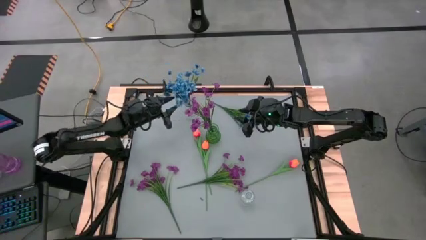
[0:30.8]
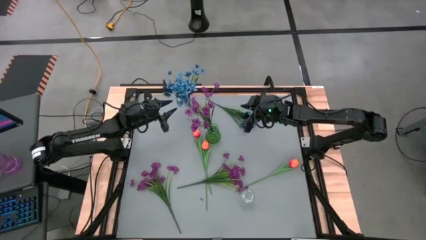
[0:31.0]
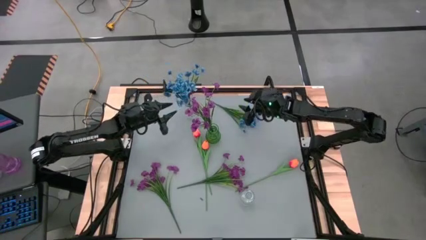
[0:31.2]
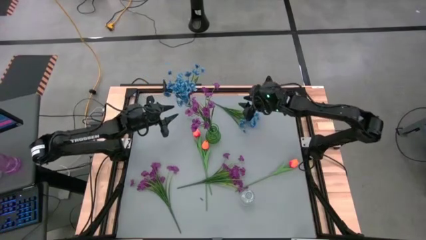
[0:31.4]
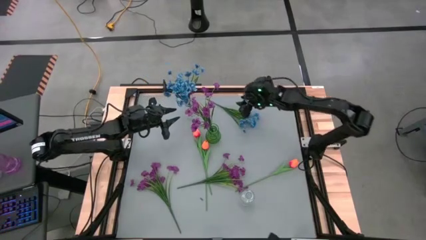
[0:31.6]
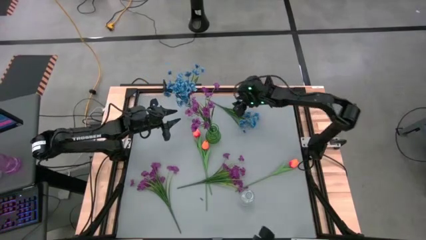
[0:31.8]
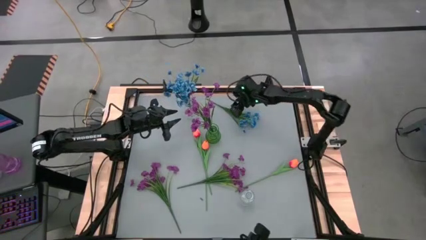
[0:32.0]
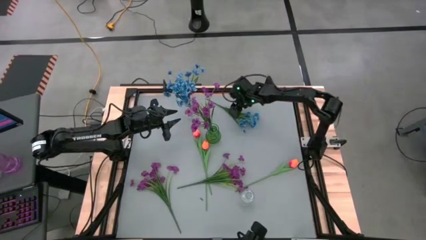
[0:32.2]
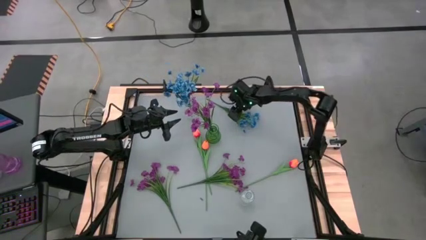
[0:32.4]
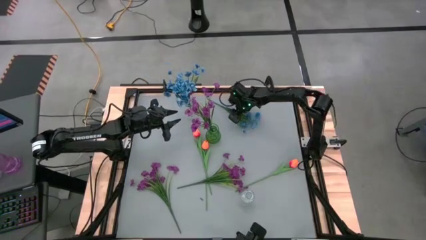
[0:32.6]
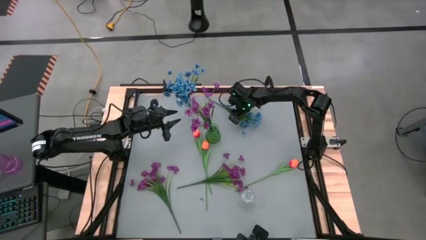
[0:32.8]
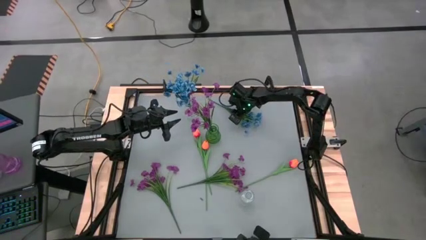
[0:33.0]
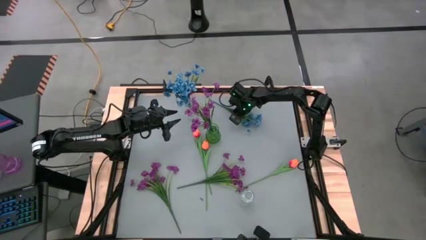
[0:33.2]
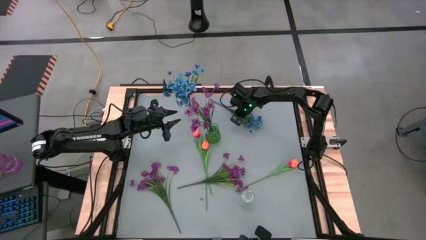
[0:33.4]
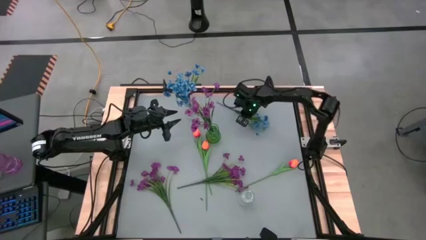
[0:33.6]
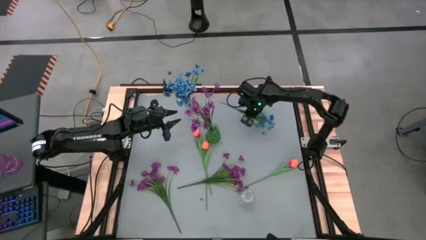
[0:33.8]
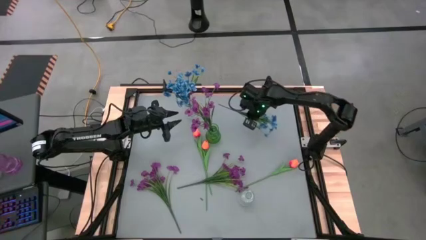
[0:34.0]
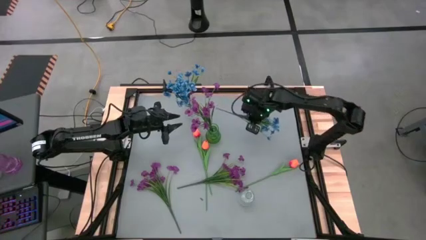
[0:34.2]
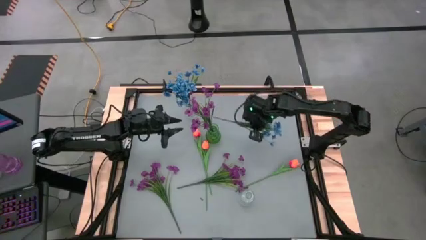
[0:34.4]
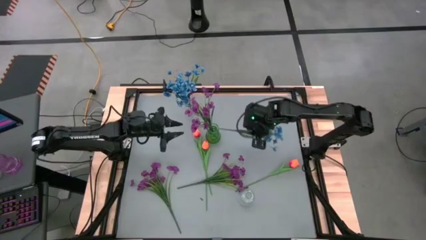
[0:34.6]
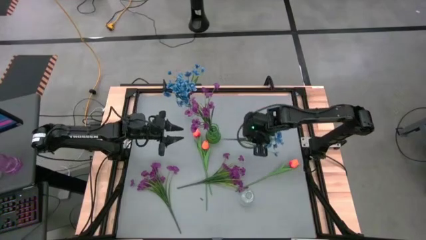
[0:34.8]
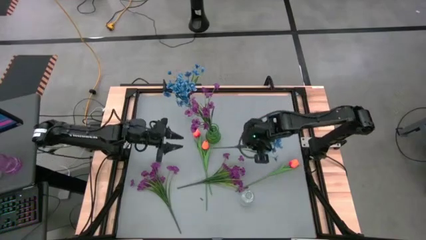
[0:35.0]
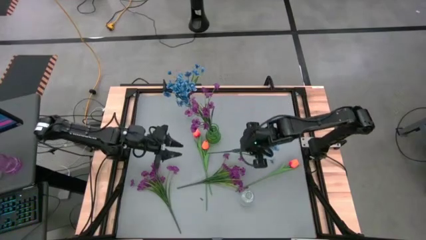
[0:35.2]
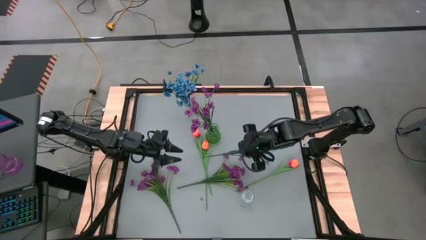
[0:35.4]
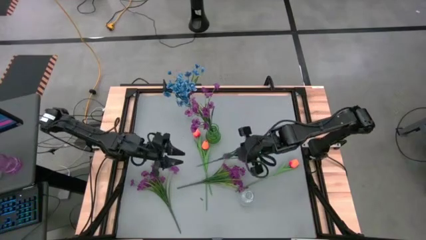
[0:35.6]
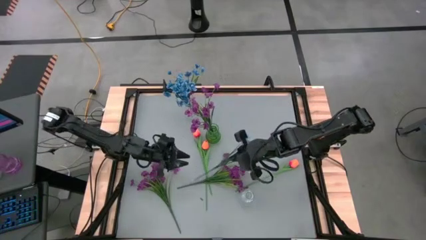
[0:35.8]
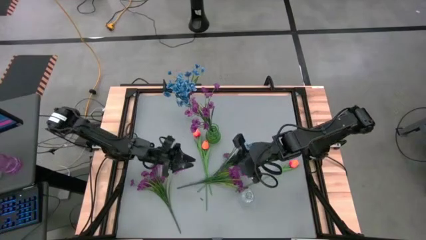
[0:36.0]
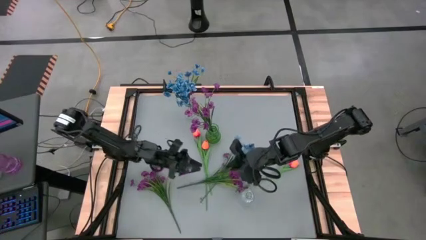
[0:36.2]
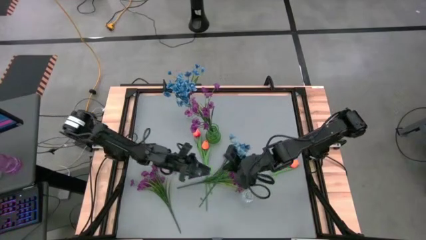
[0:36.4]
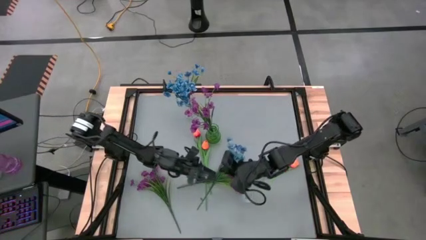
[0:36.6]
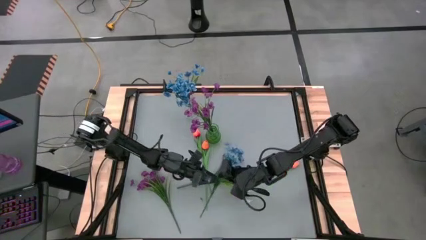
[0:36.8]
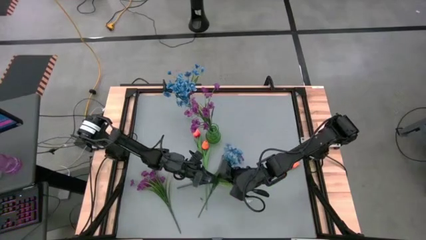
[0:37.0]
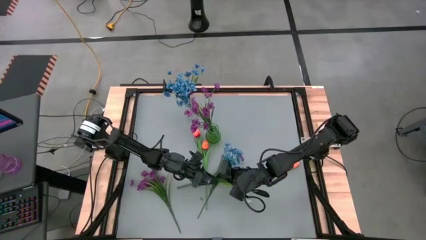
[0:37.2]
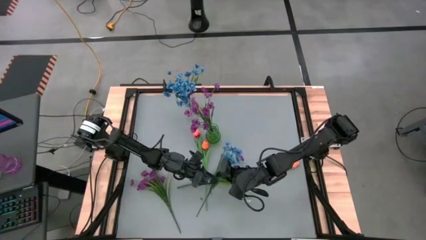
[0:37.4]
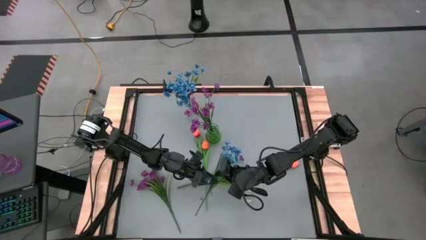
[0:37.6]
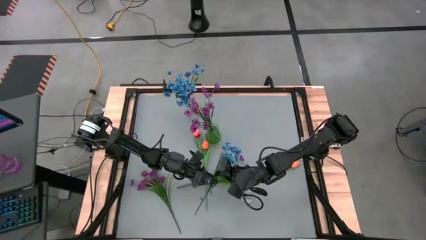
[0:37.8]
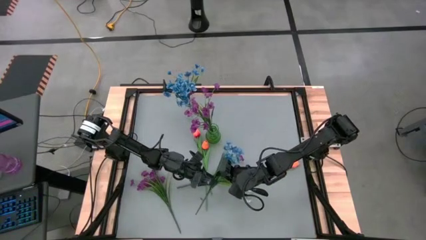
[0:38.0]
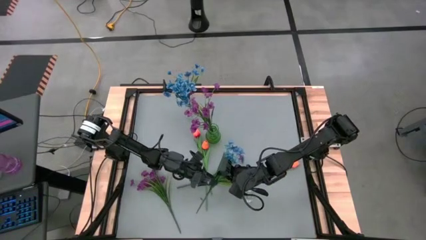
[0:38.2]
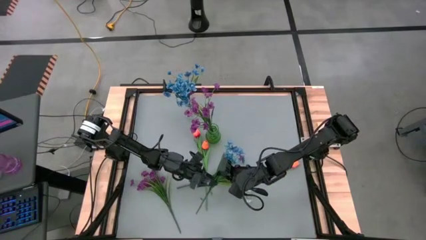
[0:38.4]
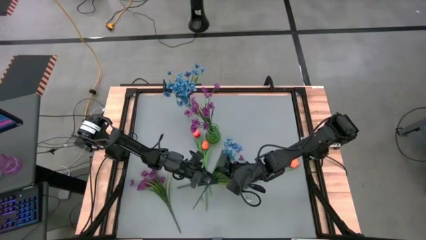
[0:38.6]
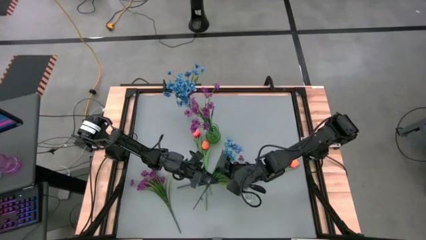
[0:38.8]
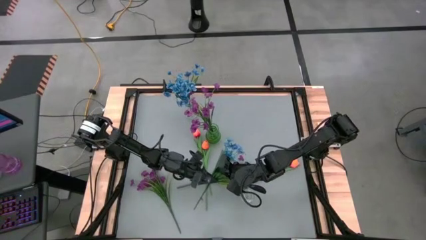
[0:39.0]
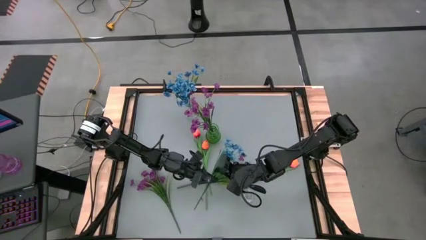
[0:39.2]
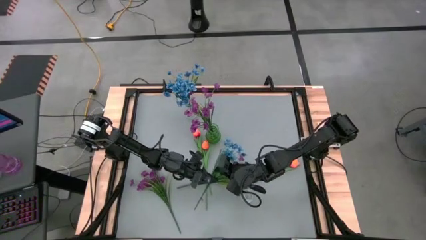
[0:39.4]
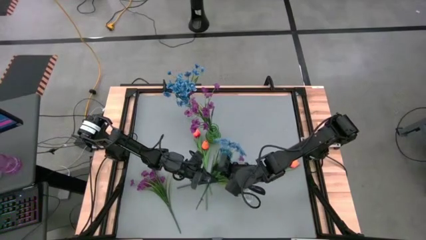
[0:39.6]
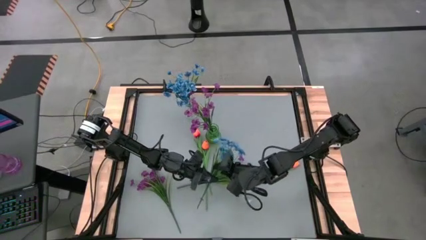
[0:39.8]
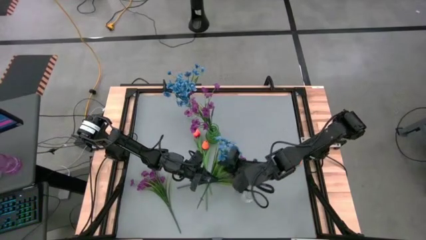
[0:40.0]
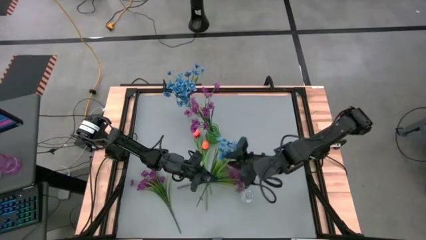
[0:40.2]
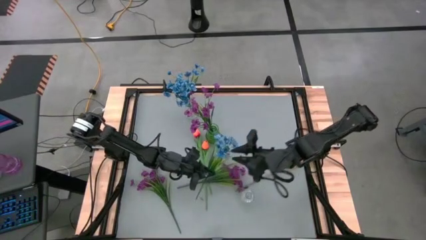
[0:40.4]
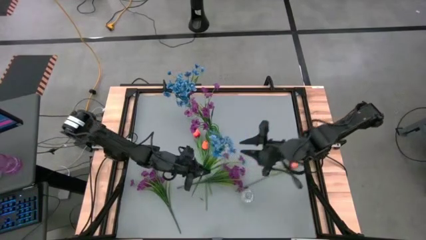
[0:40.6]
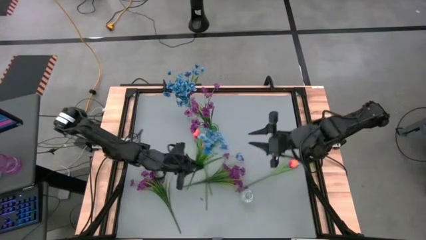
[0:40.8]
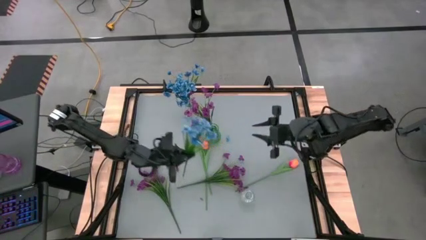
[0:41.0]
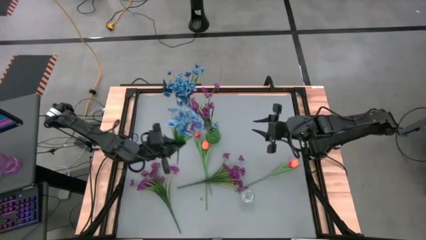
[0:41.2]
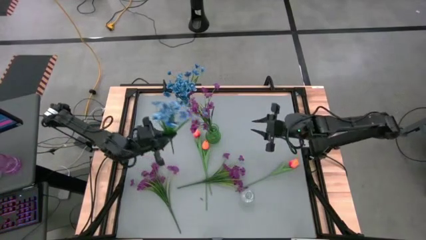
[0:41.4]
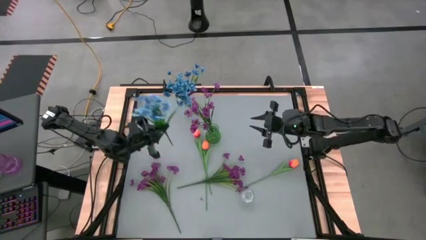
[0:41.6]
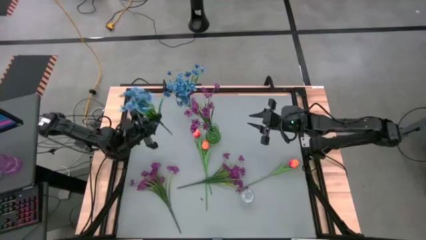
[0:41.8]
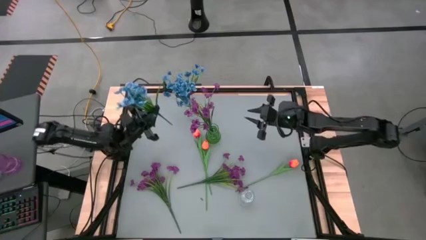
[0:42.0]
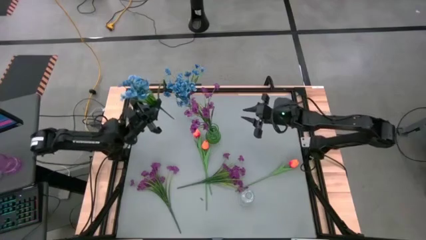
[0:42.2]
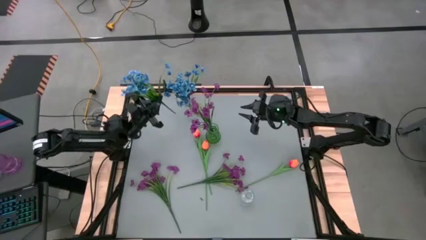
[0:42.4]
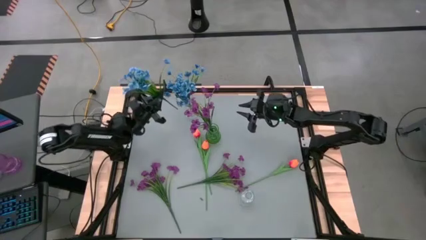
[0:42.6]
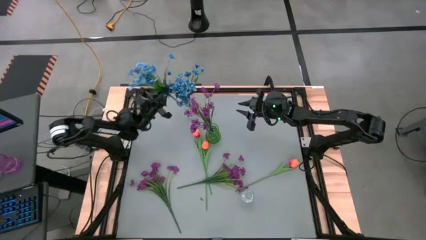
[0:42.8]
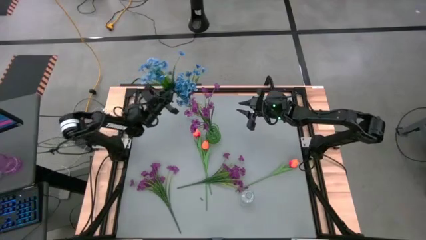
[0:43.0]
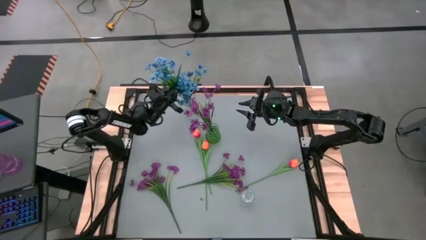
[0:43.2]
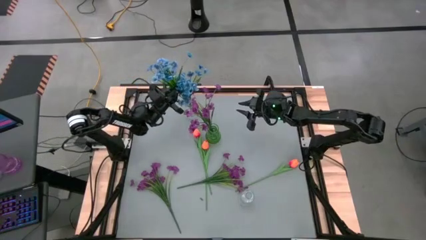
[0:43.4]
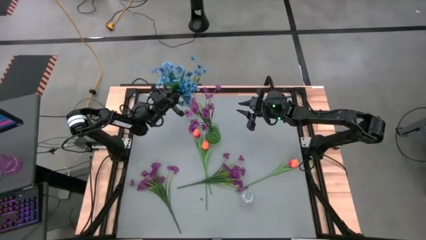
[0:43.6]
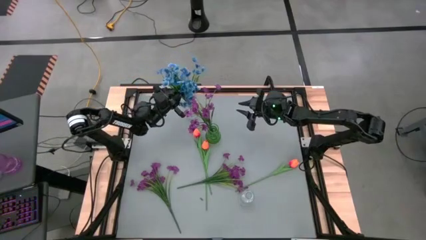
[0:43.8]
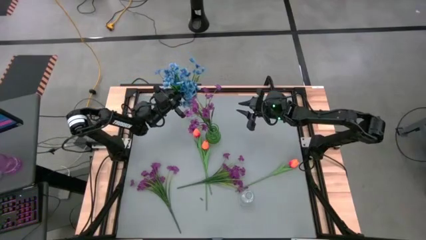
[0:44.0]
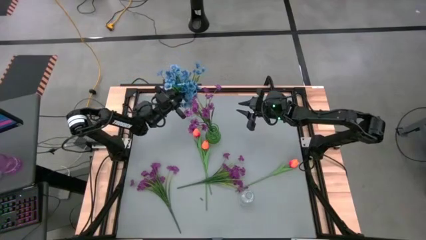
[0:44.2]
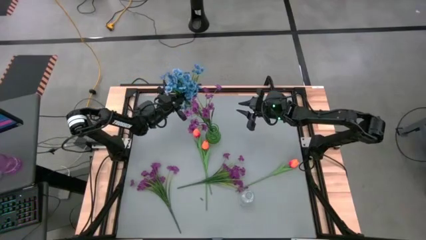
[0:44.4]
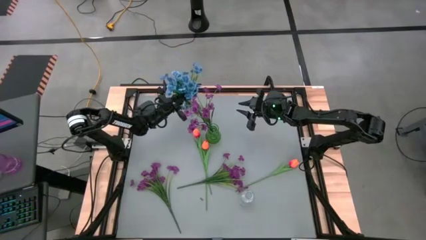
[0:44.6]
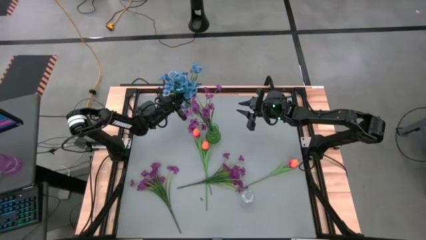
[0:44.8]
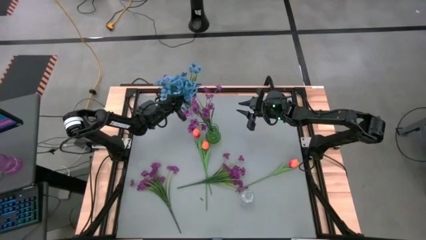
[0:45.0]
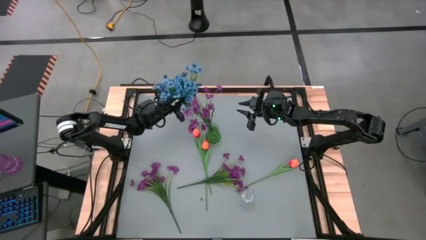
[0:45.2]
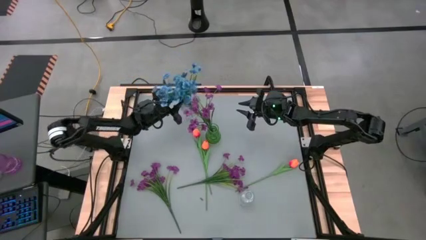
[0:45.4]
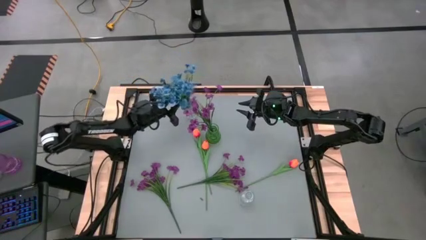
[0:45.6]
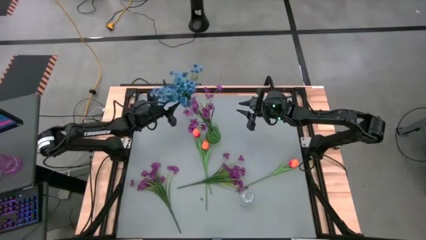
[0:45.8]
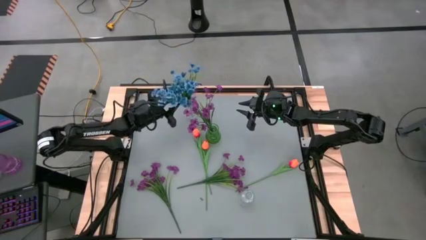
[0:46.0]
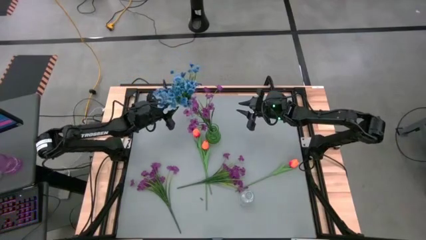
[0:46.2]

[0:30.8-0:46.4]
Task: Sort flowers into vase by color
Put the blue flowers into the top transparent vase
